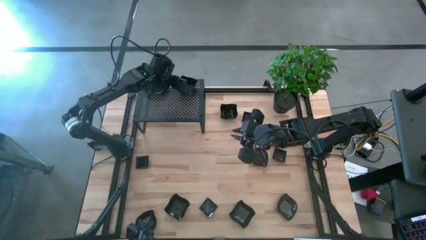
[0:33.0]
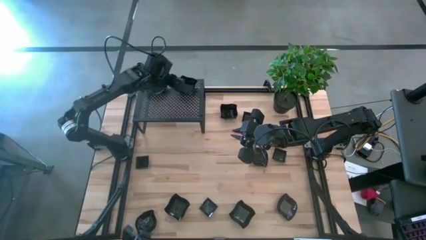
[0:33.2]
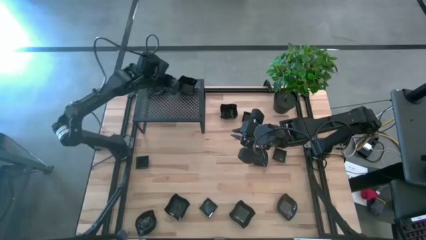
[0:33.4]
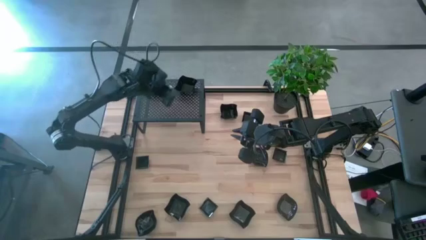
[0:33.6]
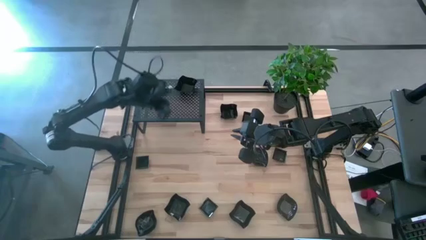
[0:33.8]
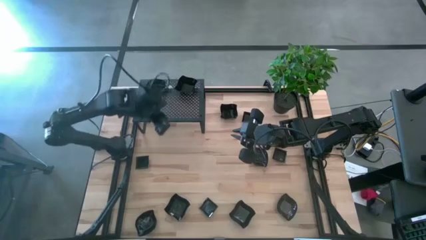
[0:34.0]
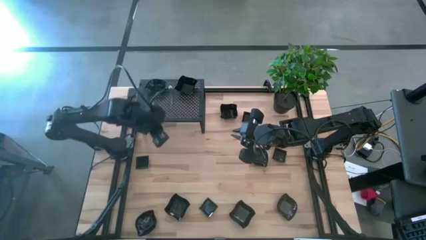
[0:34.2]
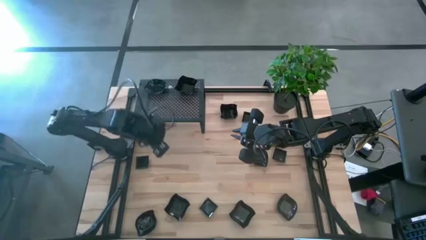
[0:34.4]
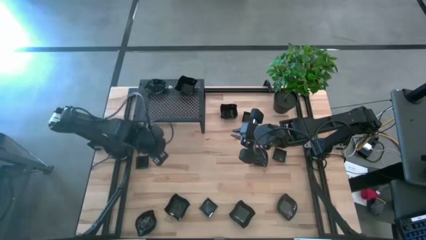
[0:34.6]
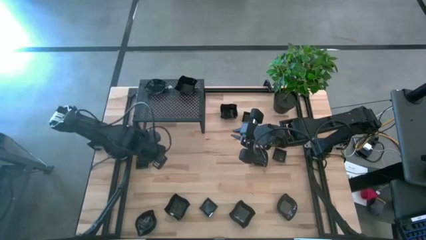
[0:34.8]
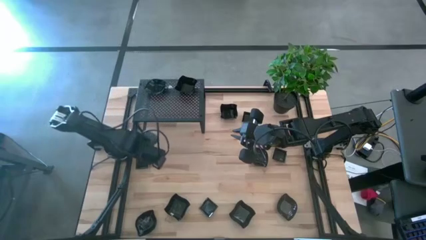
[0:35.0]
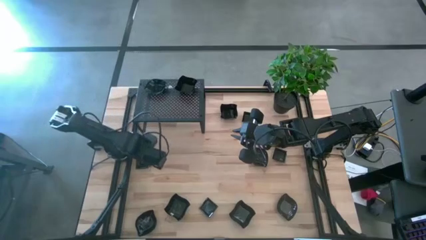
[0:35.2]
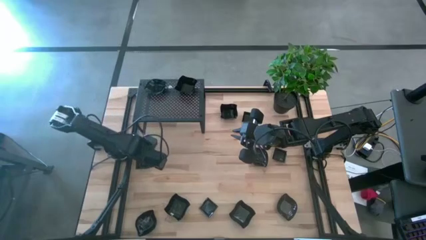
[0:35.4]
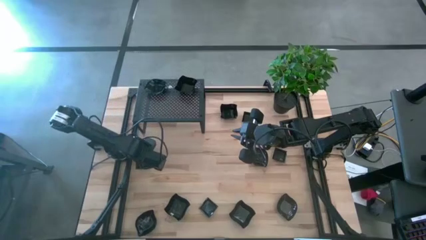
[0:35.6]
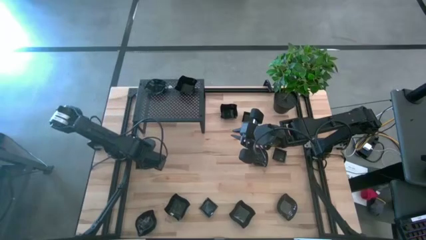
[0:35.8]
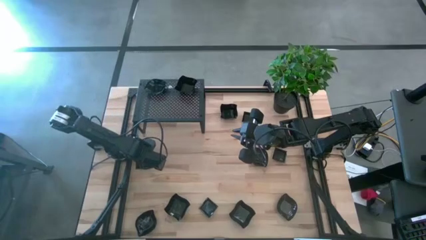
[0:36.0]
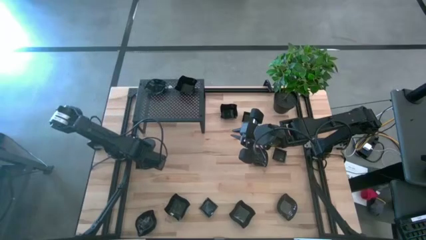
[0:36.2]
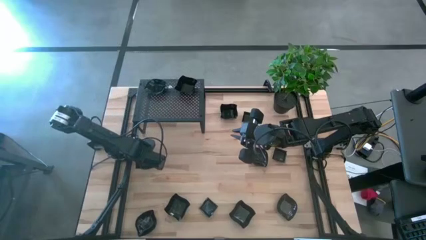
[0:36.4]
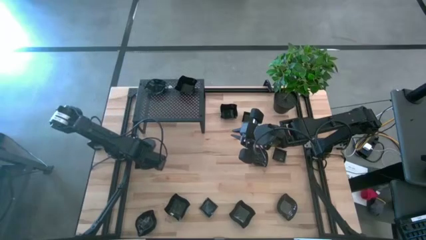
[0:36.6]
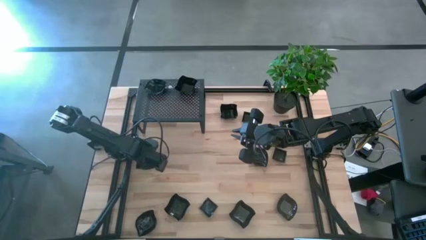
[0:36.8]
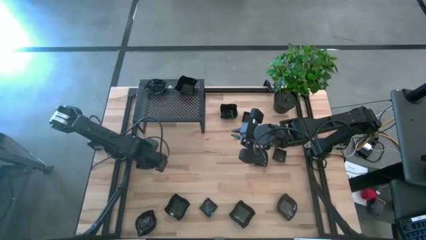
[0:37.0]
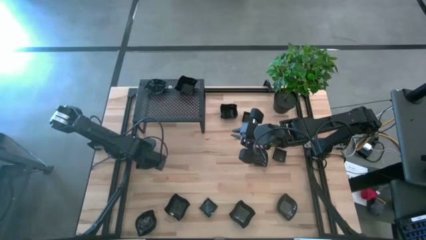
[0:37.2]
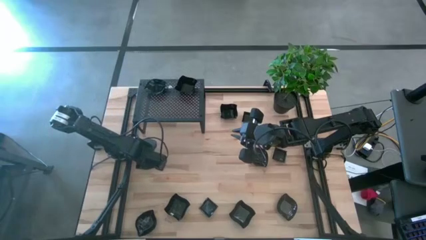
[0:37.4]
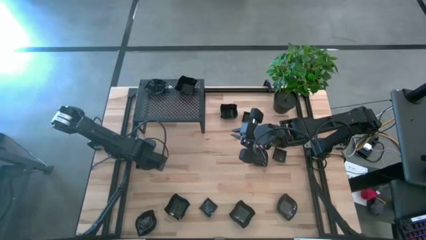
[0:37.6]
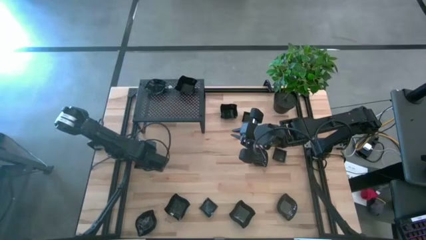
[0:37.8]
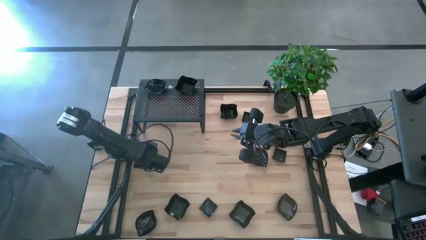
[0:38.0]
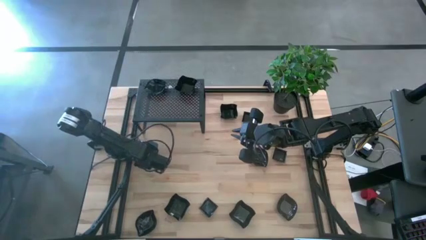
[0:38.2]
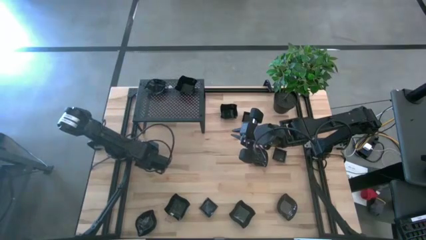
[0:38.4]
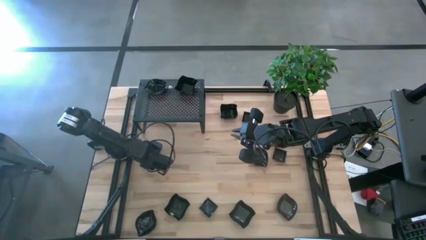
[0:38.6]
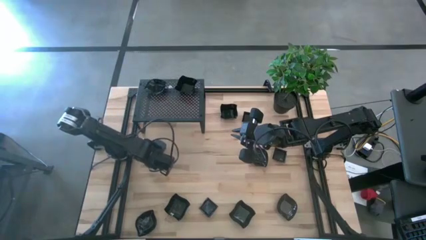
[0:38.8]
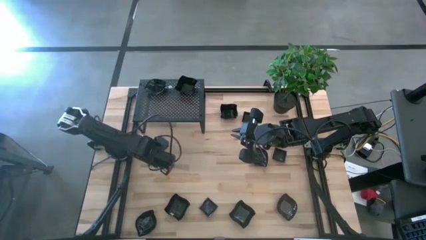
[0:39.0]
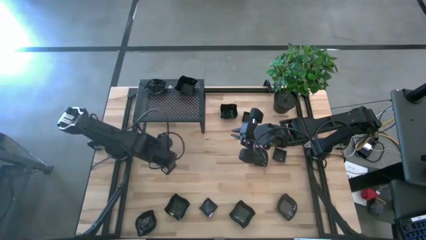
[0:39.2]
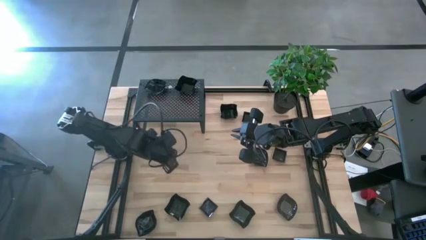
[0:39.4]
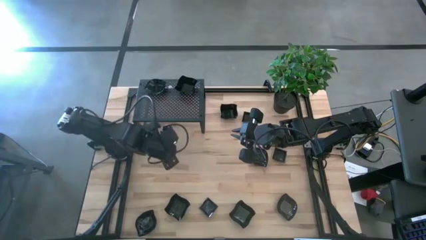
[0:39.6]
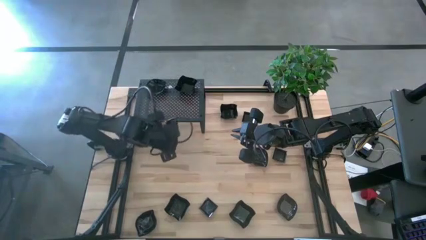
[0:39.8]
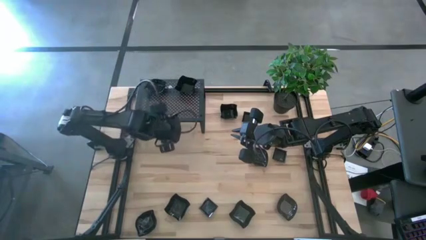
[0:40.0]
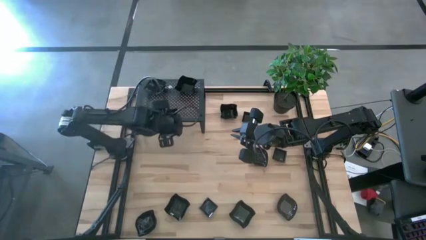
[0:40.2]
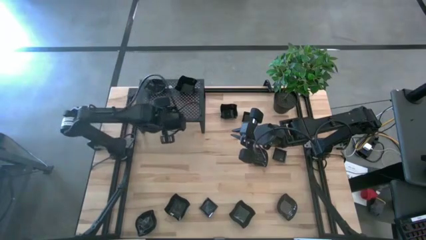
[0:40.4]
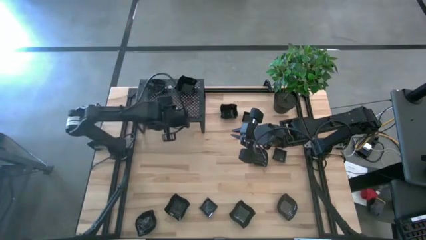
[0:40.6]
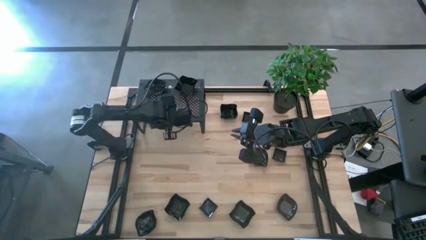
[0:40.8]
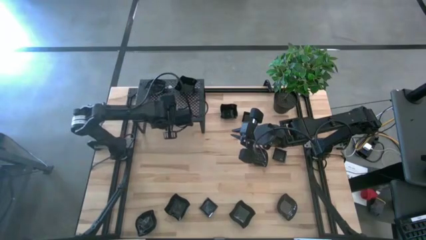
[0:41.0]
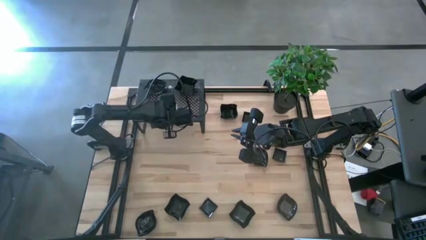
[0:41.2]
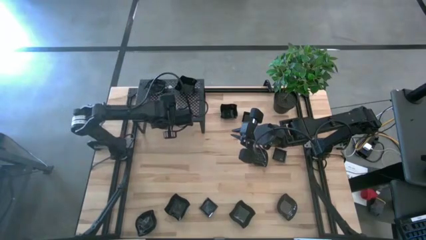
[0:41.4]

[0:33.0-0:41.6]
Task: Pick & Place Mini shaped plates
Put the square plate on the shelf

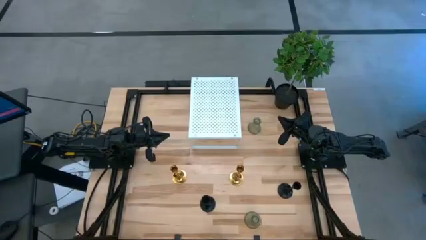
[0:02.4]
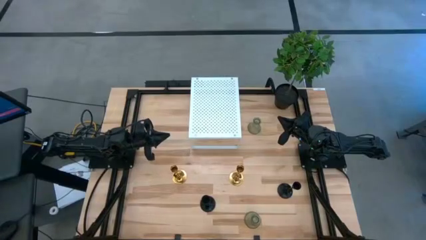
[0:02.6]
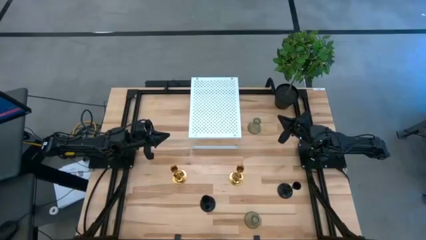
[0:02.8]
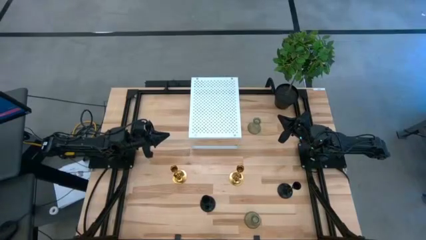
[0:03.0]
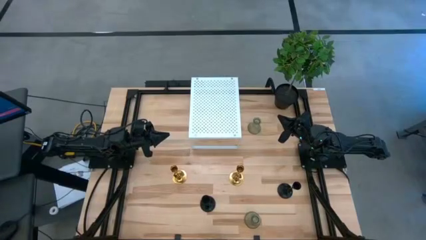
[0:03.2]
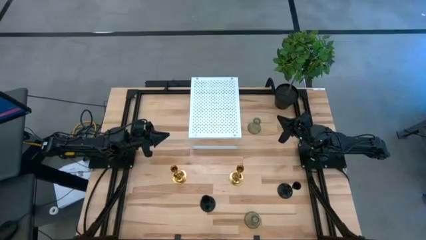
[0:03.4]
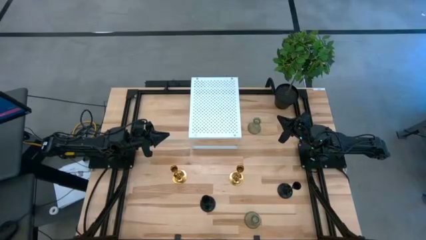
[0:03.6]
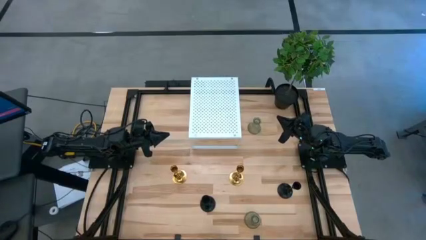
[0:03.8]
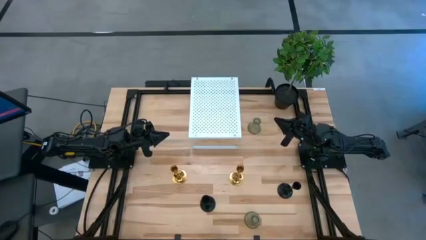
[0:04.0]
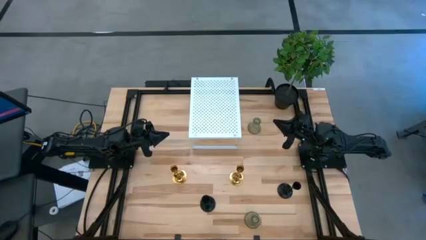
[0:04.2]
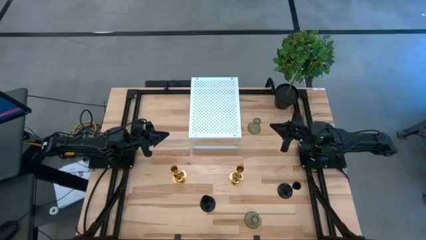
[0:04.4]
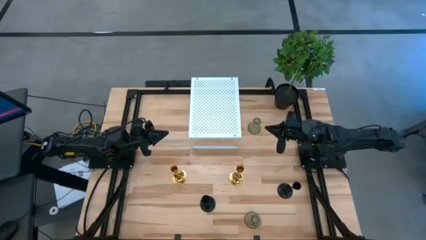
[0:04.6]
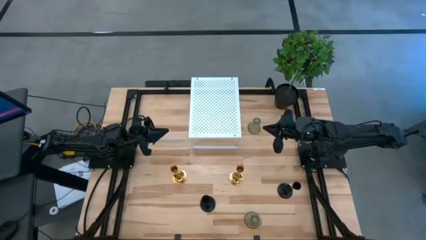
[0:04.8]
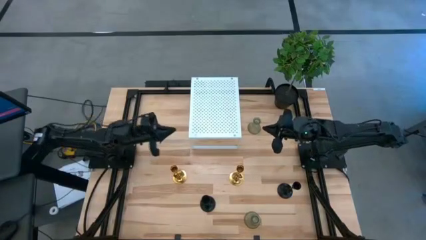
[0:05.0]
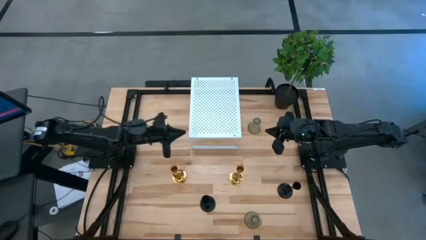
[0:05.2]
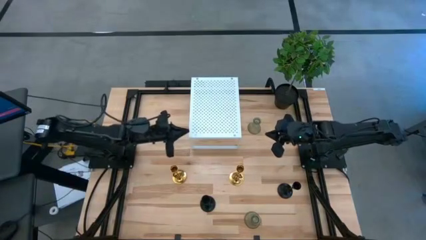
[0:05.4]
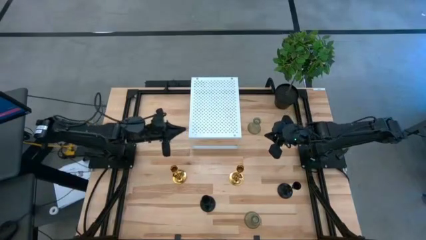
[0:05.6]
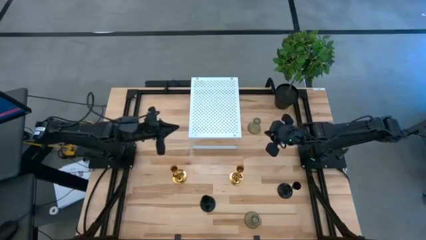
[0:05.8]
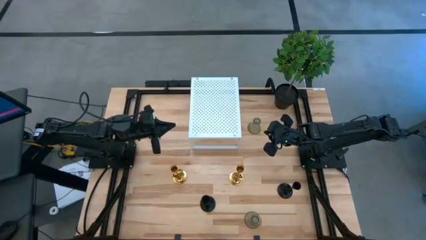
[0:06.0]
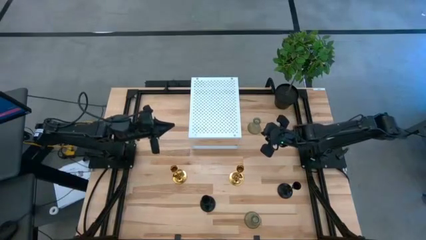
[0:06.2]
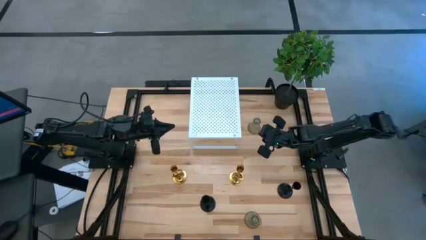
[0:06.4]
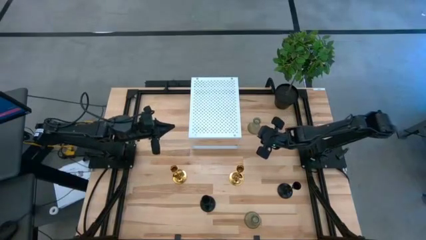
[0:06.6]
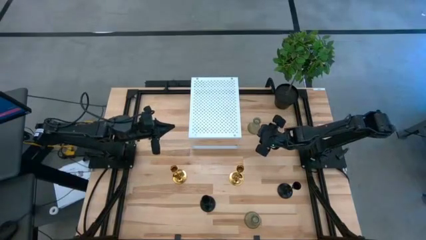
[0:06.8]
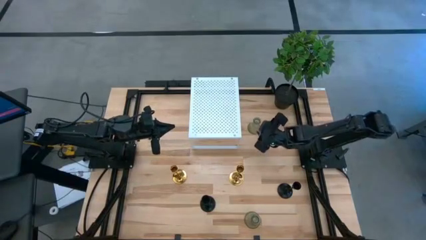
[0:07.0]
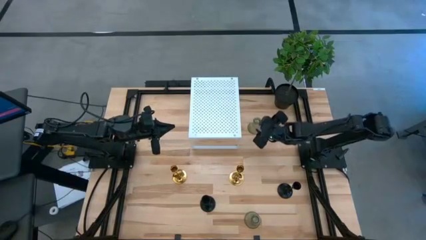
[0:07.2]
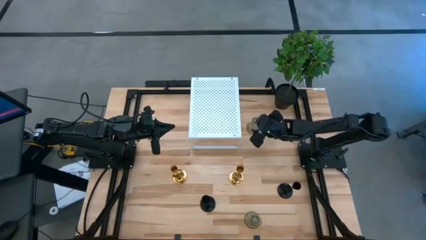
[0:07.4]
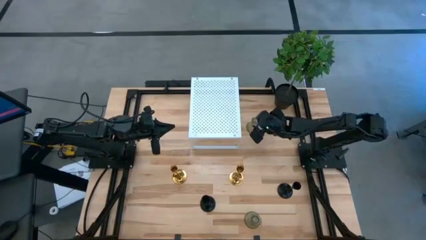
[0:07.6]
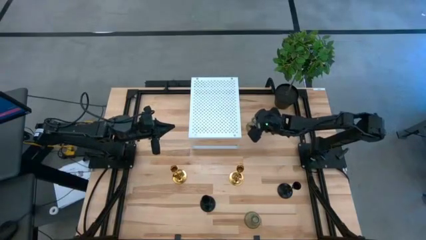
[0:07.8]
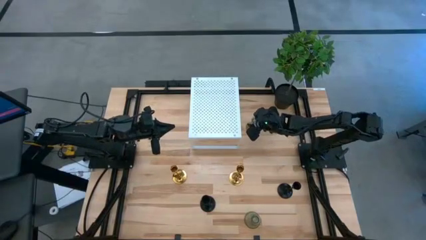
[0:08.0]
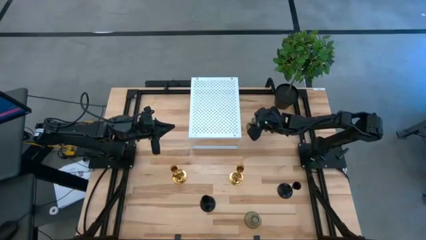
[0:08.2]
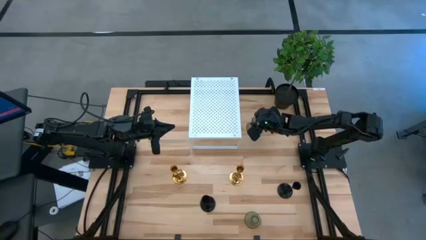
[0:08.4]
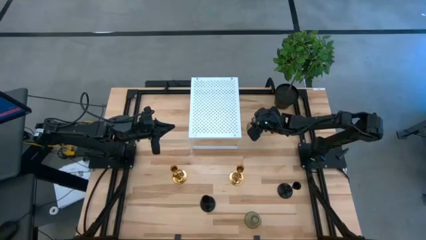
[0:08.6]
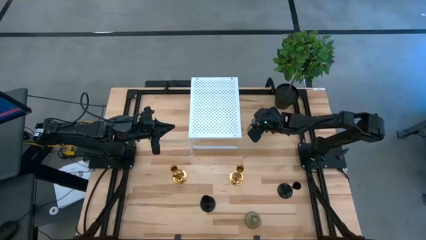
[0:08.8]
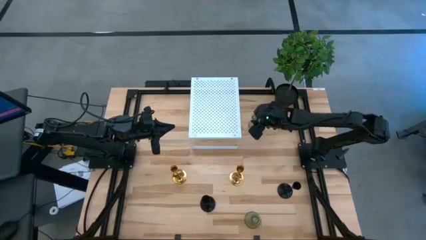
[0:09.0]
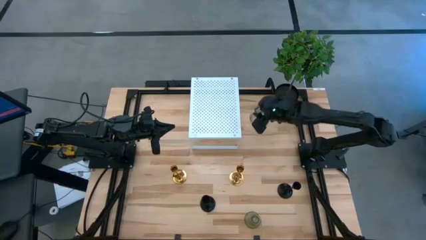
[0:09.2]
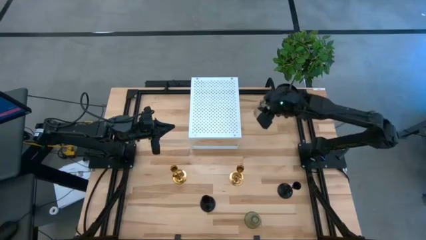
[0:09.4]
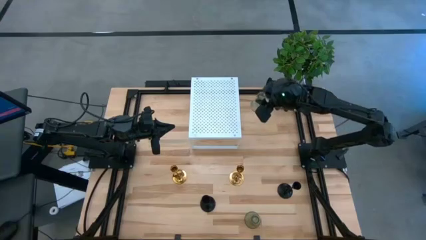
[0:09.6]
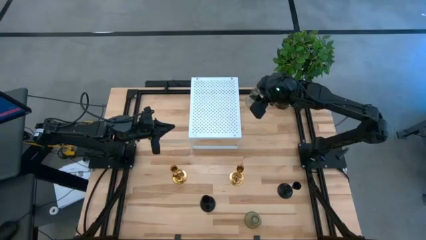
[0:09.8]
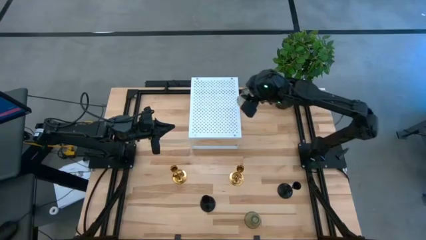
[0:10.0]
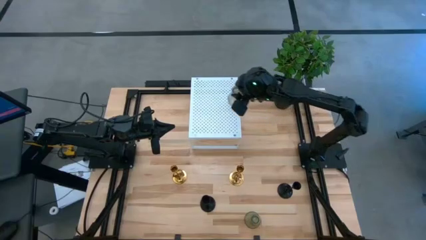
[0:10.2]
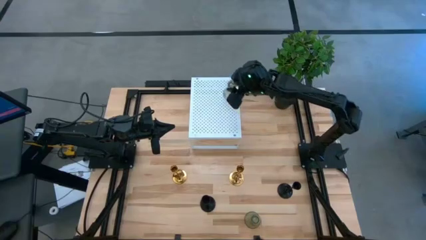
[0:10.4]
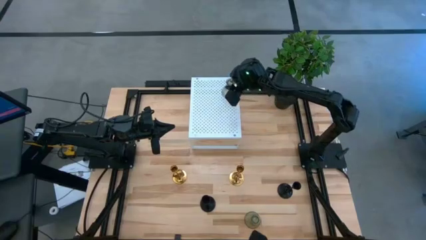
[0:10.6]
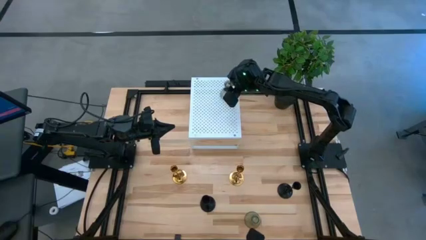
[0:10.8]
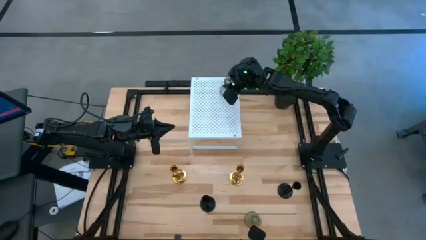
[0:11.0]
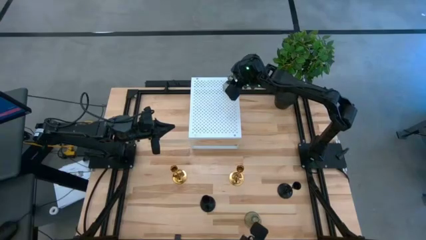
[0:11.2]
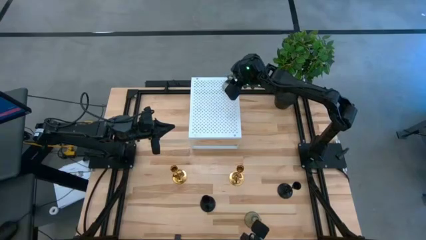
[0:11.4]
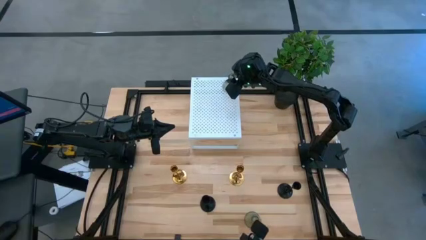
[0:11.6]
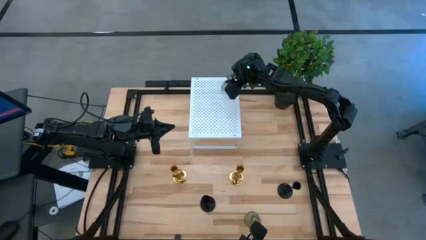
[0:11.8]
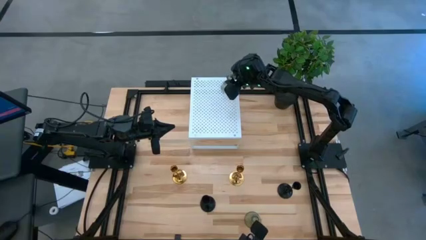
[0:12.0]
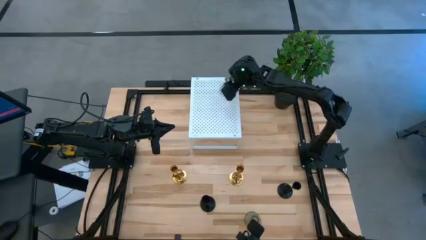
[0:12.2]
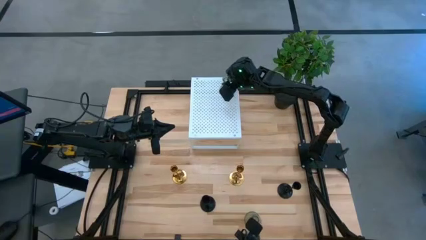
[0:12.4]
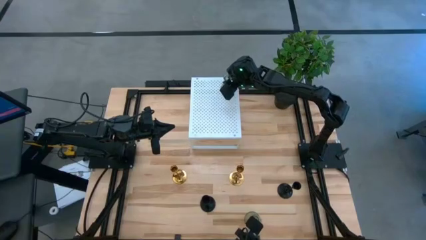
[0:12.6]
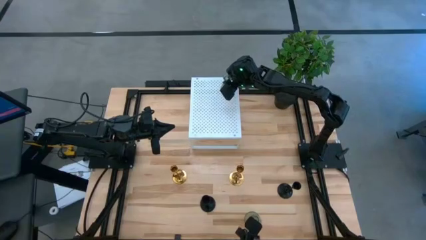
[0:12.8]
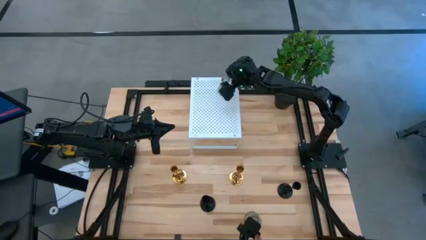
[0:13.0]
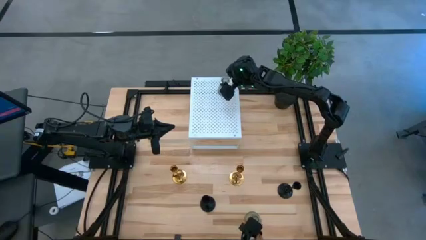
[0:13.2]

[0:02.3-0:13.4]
Task: Pick & Place candle stick holders
Put the top green candle holder on the shelf
